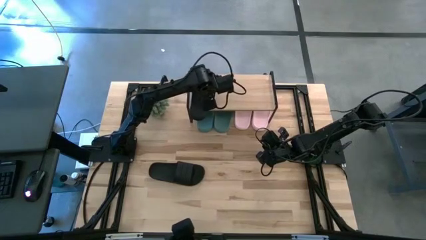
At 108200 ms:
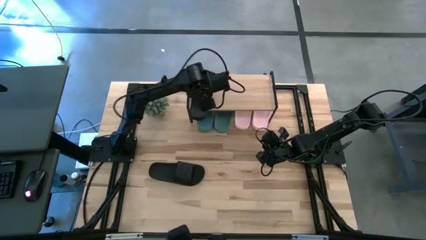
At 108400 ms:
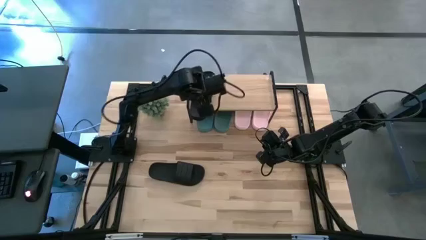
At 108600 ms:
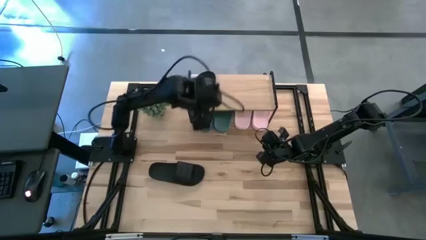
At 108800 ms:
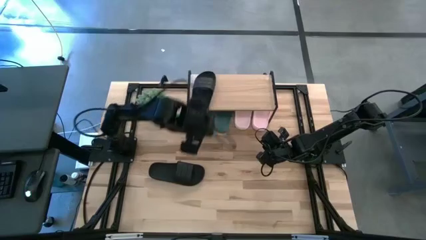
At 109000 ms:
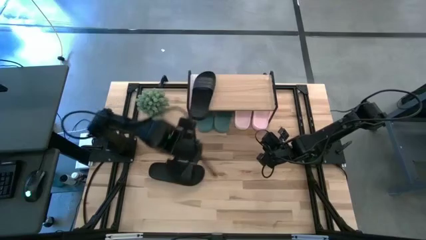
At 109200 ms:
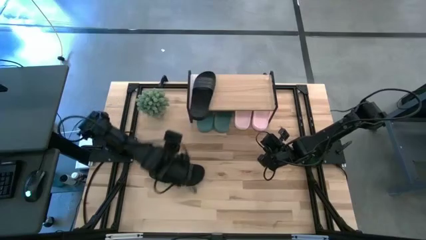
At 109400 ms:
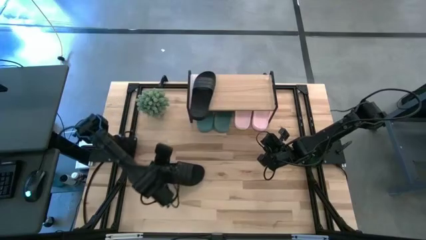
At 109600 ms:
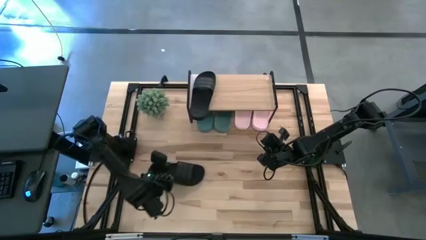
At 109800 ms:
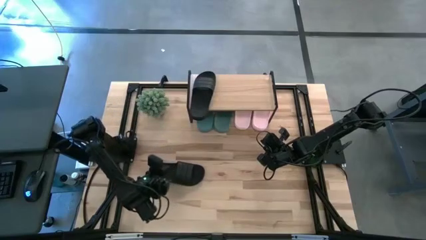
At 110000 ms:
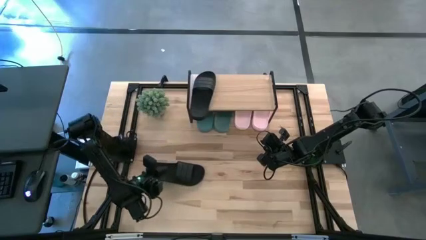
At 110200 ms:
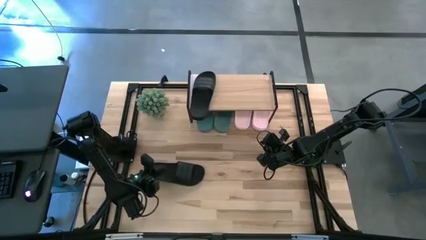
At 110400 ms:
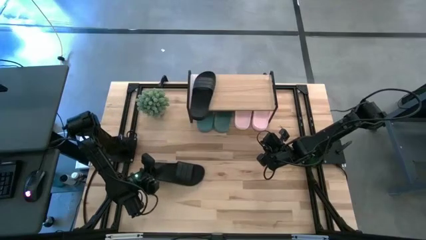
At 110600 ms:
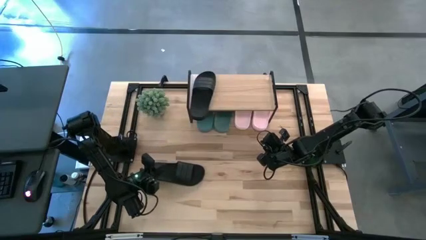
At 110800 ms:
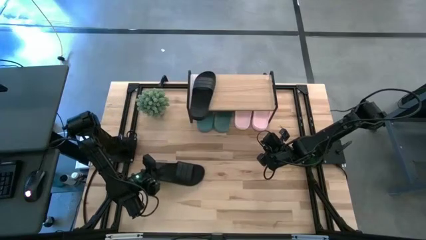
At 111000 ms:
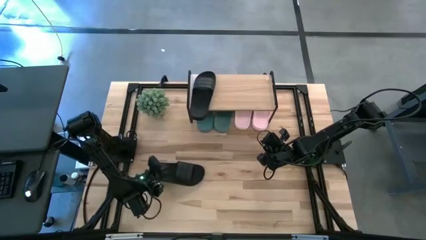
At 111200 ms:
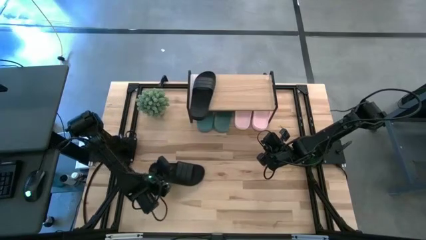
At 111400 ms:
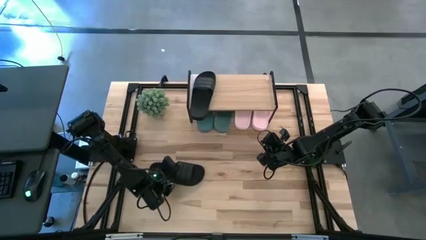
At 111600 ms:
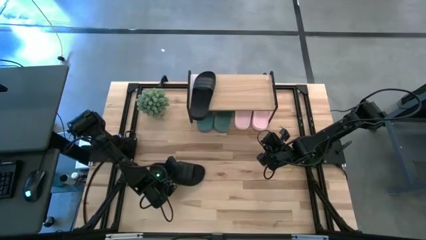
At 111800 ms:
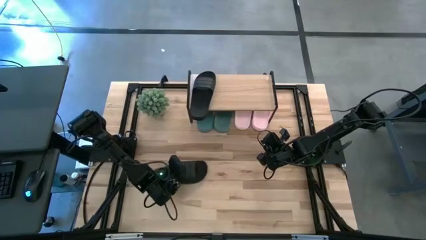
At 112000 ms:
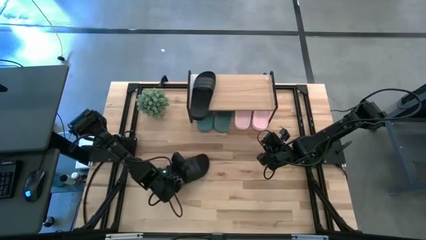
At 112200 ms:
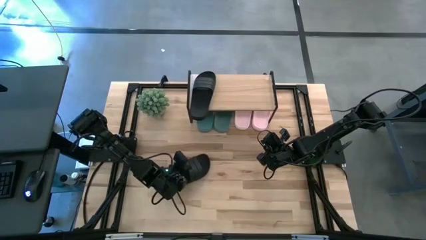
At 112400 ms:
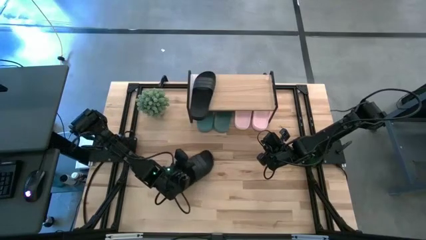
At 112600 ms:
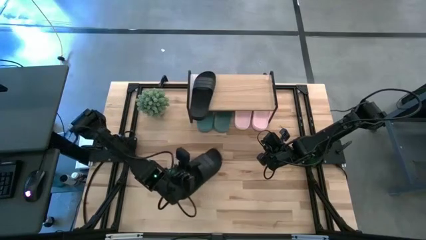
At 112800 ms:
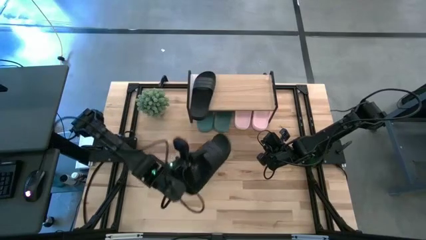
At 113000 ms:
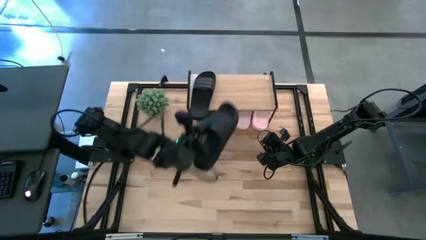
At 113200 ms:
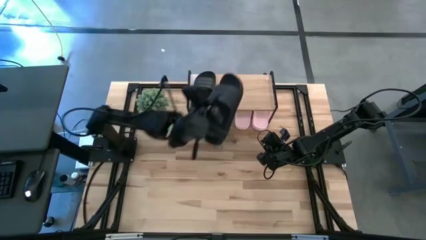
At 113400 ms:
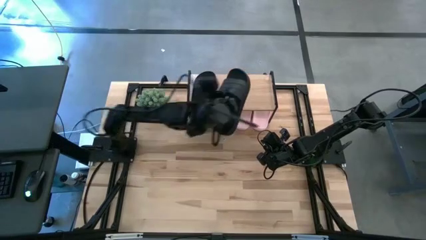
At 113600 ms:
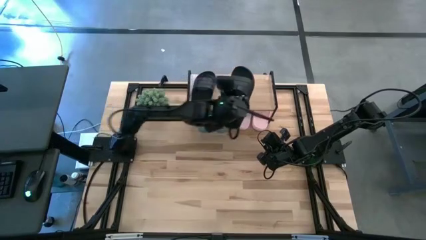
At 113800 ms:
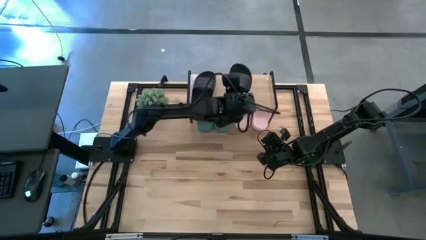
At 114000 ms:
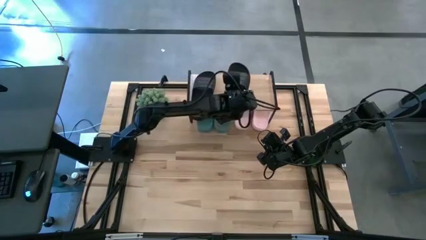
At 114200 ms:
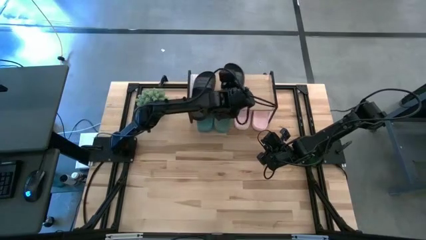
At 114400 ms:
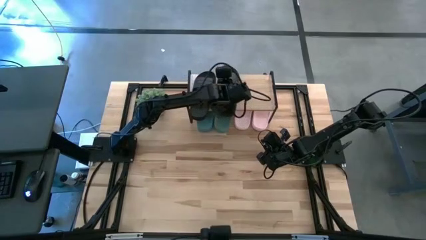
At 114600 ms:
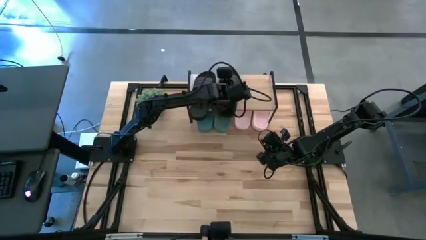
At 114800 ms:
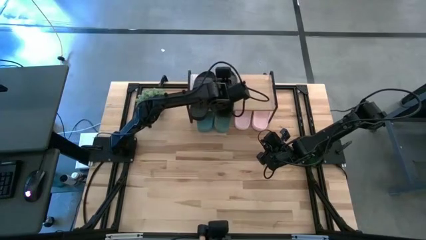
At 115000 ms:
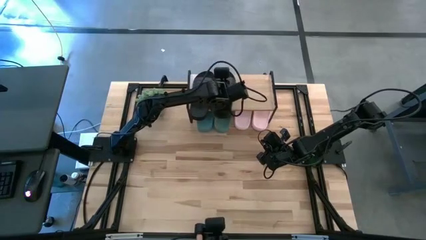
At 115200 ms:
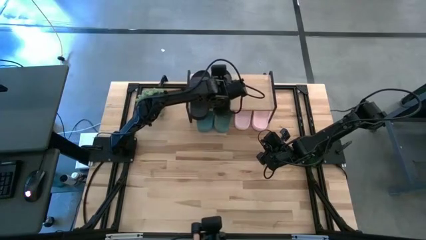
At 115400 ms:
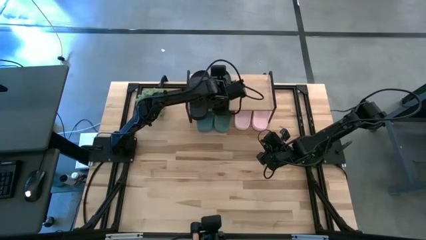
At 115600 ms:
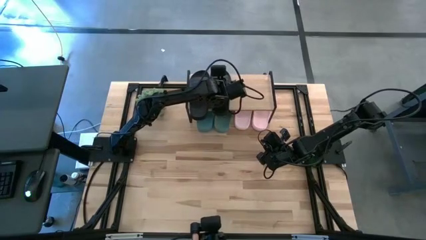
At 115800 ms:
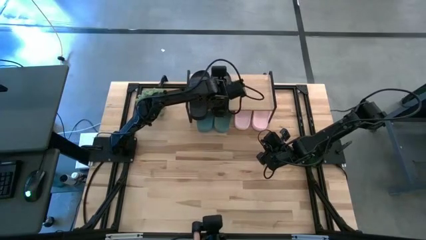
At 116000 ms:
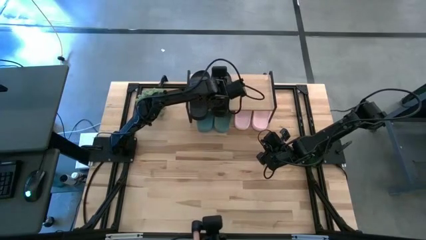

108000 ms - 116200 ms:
Task: Pick and place slides into the shelf
Put the black slides on the shelf

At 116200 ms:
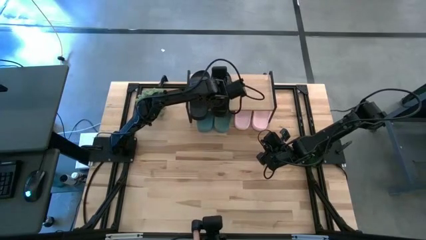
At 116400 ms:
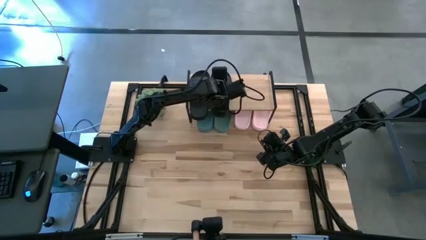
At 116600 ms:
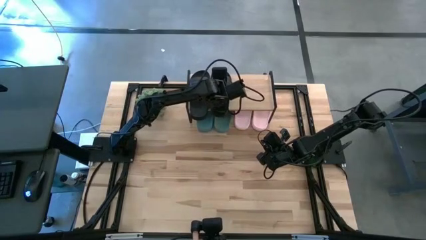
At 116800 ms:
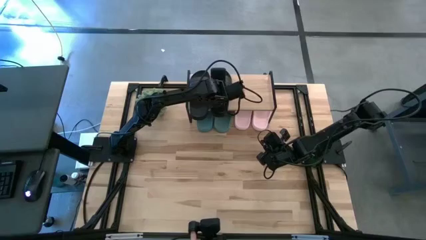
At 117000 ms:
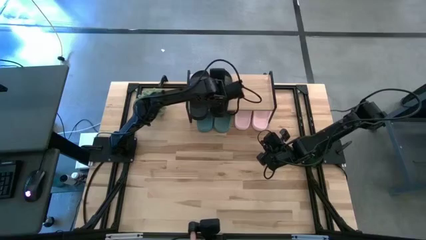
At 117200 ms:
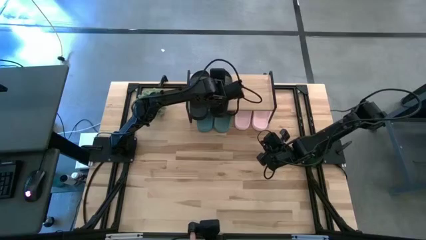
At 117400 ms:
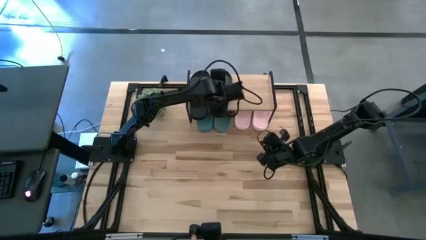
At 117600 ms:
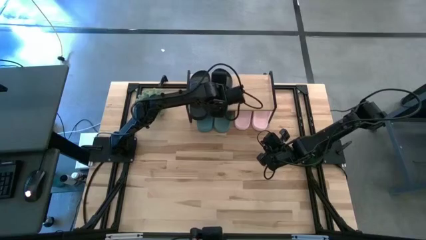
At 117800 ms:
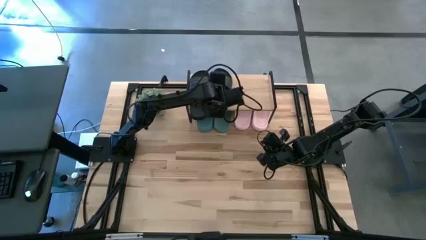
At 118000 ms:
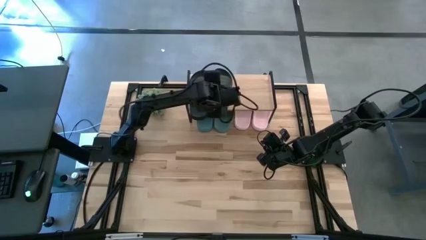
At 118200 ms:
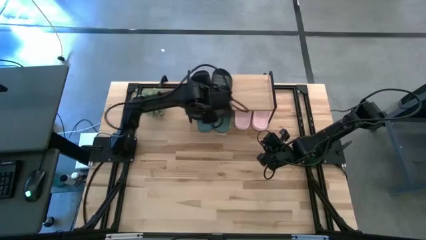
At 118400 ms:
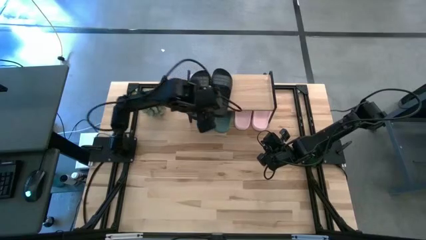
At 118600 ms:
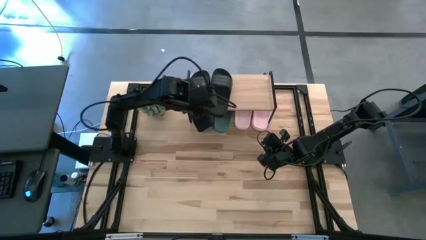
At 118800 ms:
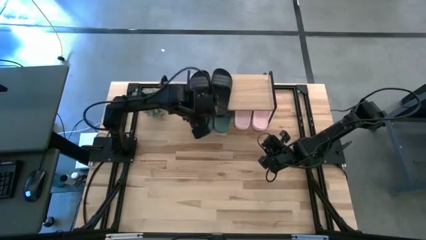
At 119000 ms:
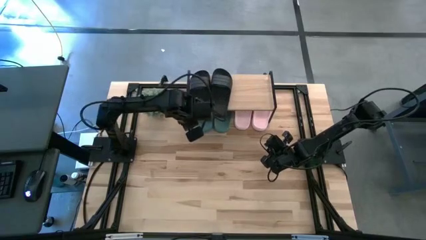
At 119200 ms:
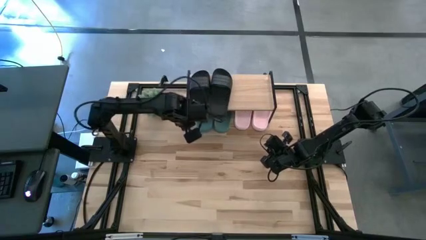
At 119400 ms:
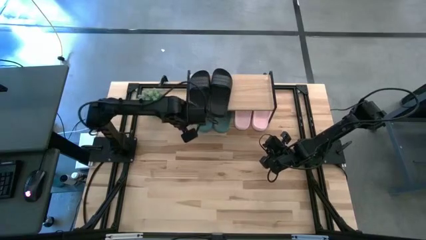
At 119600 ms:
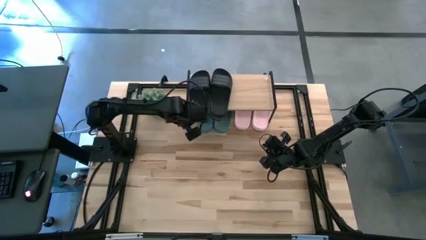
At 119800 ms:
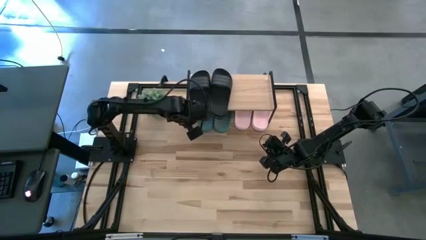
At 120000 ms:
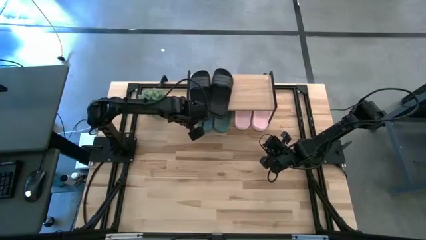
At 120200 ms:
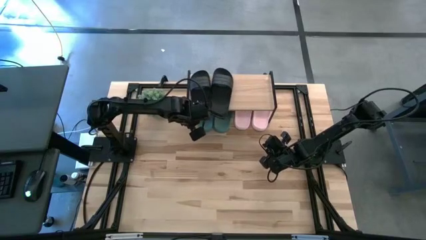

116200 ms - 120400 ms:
Adjust the black slides on the shelf

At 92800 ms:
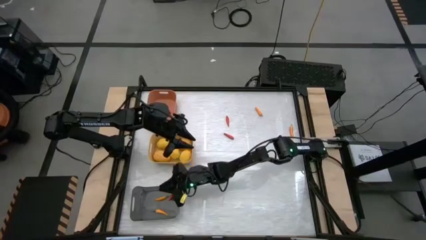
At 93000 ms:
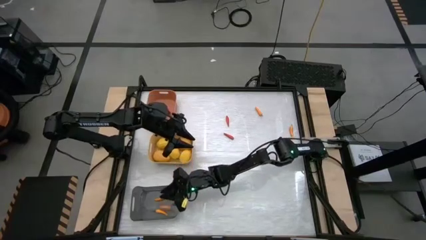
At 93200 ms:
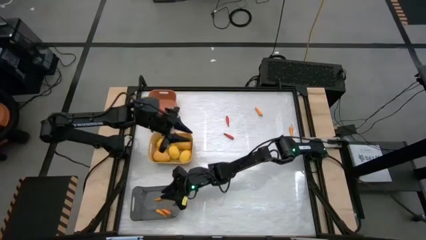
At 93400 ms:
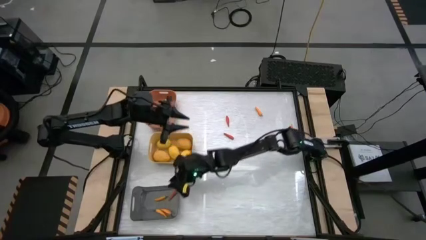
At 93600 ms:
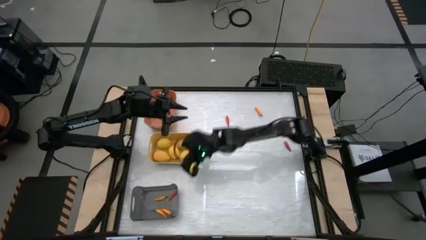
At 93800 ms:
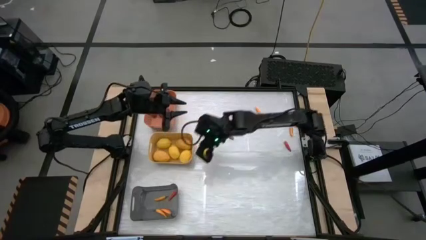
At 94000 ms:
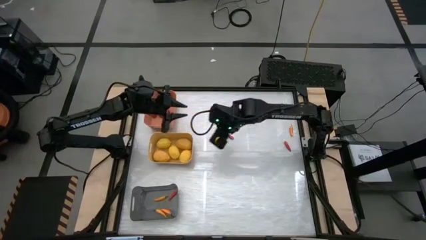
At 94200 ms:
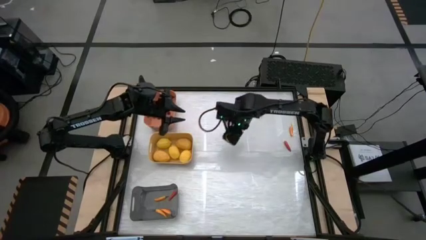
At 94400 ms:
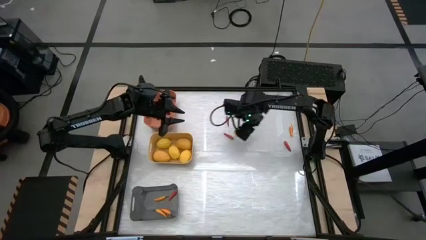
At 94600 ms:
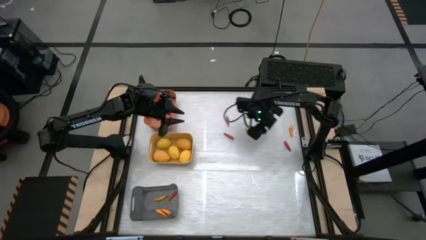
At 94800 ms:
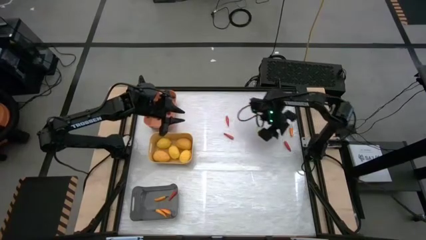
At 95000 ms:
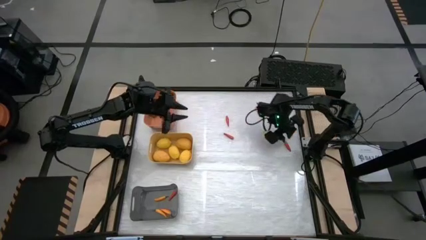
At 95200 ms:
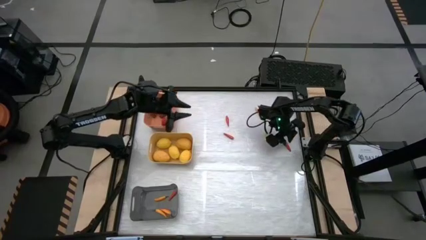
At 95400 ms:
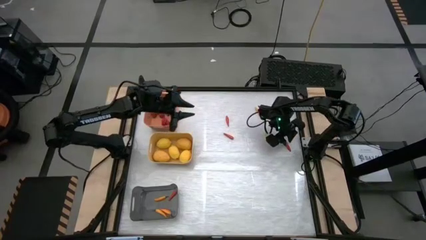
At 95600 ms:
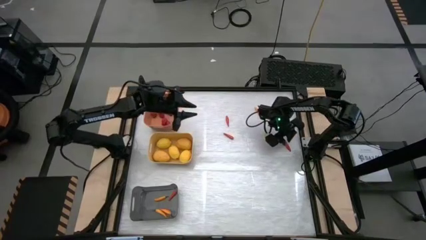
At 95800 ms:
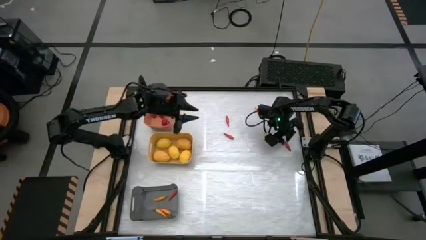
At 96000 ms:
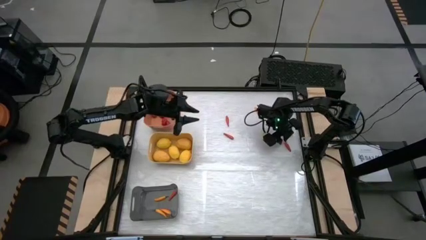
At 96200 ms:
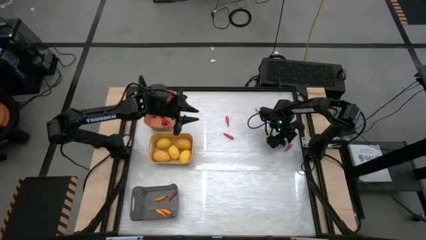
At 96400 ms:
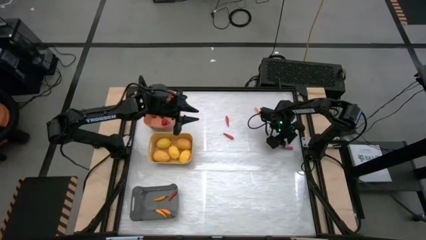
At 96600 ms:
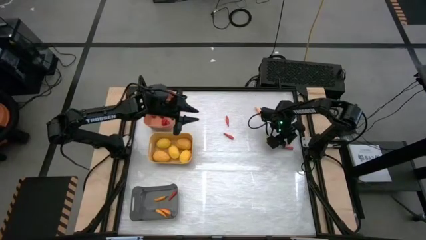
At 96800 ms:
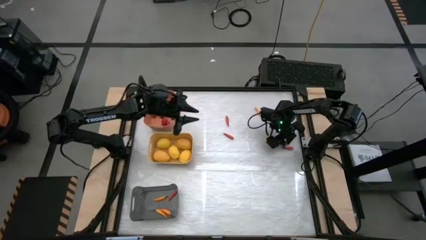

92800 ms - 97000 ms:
Task: Sort produce into baskets
Put the red chili pepper into the gray bin
